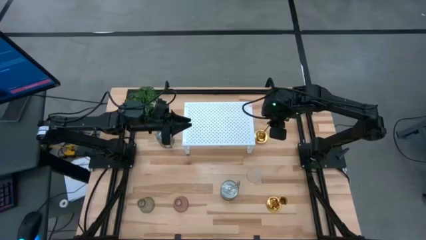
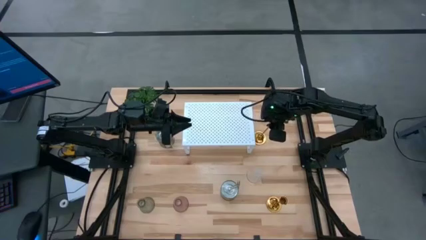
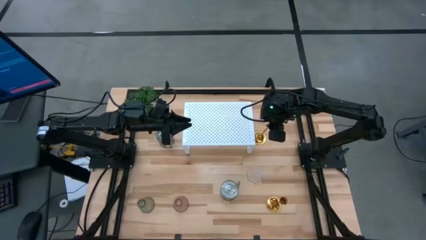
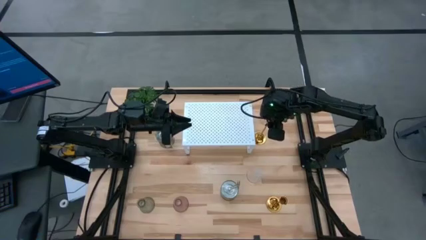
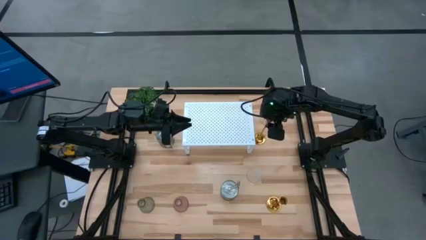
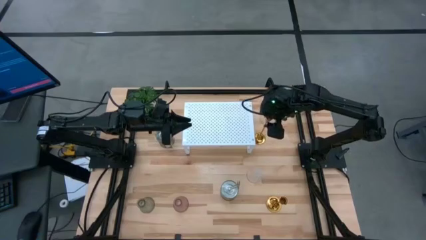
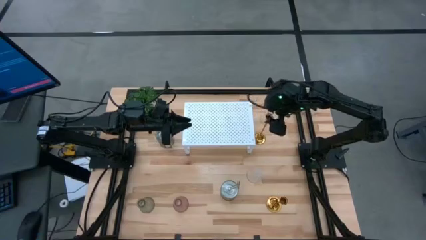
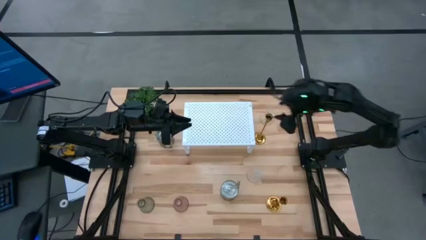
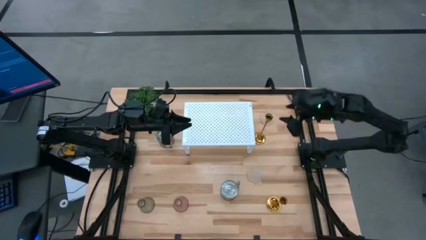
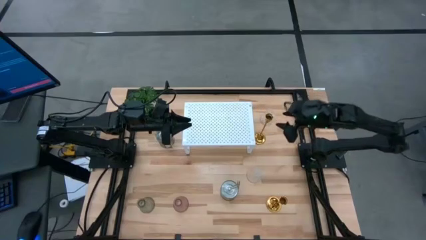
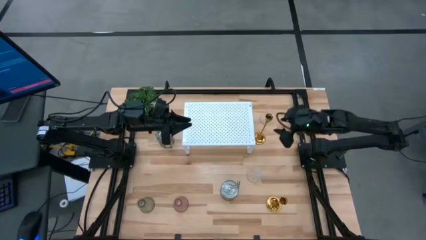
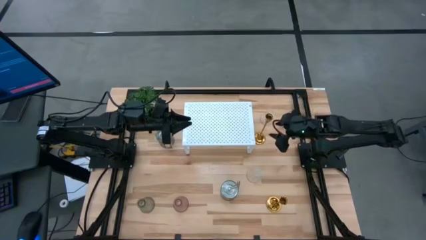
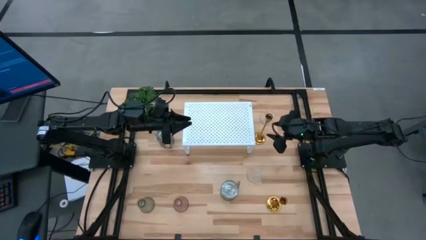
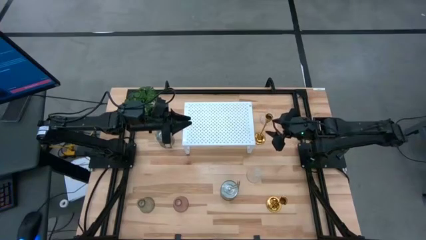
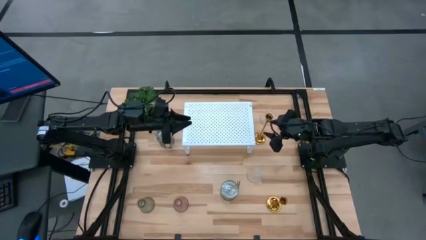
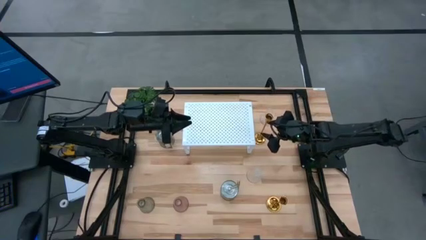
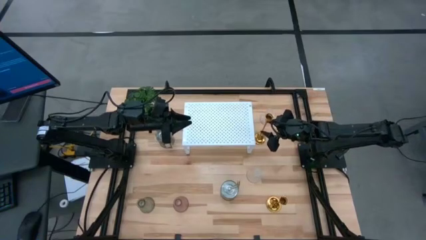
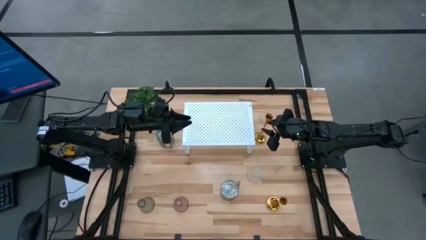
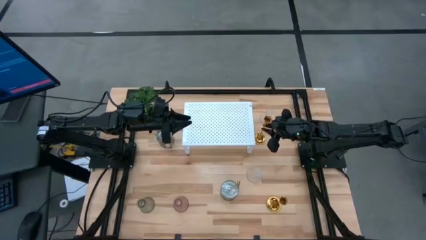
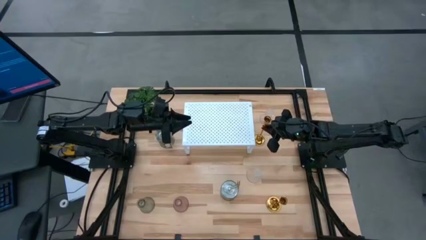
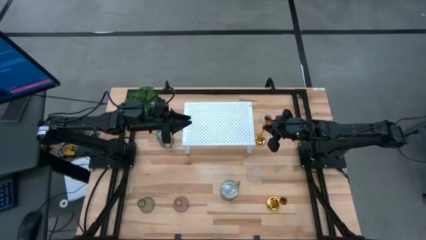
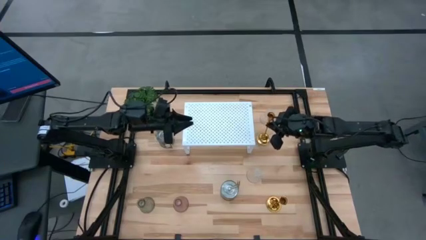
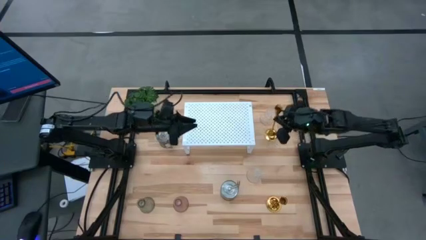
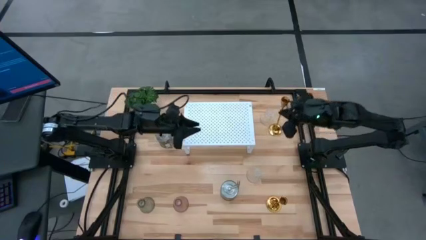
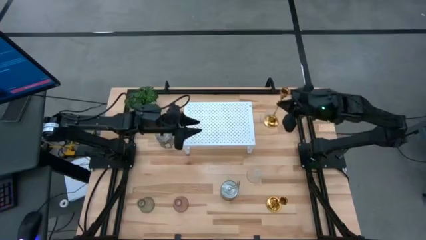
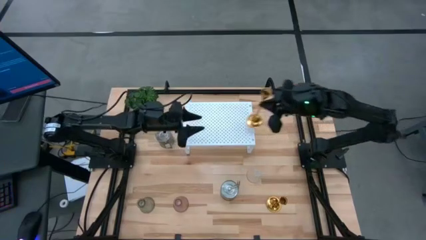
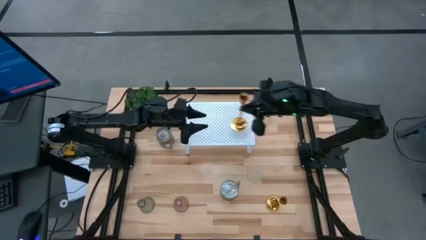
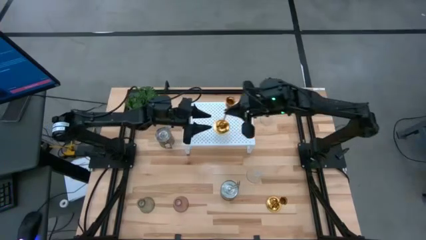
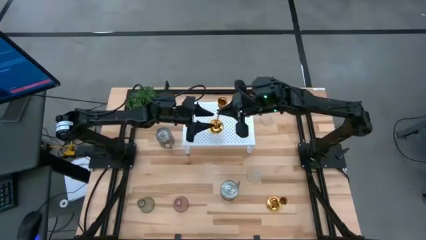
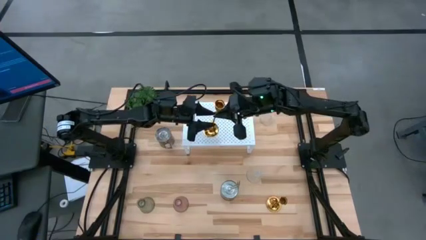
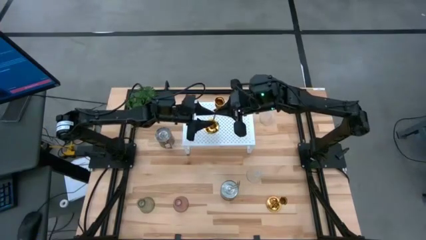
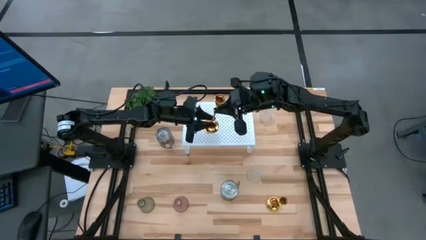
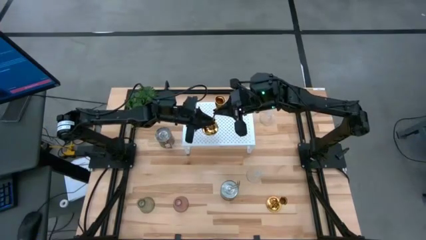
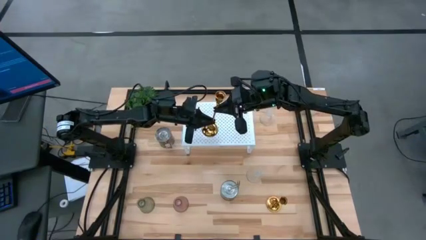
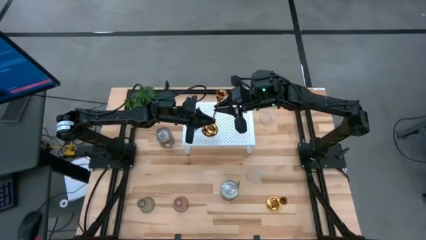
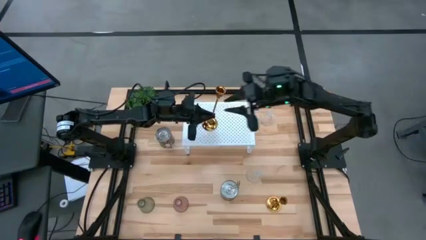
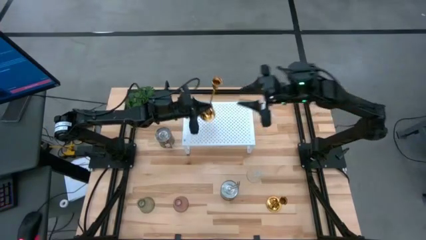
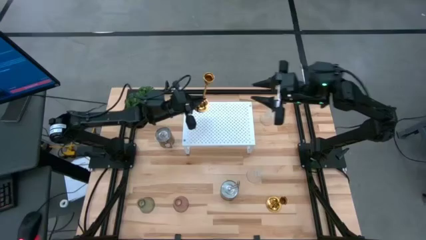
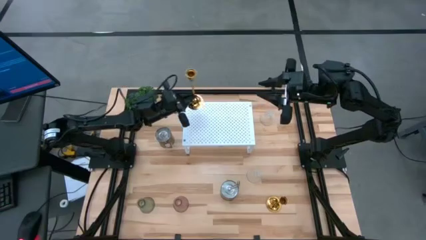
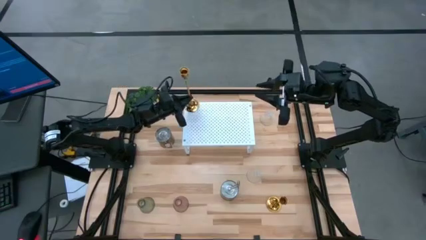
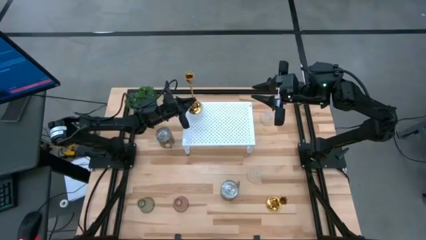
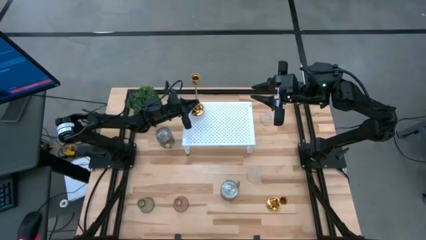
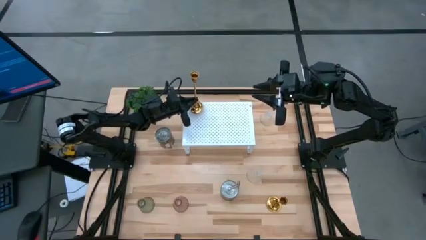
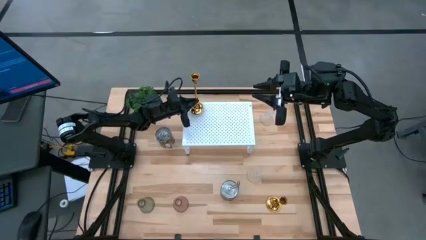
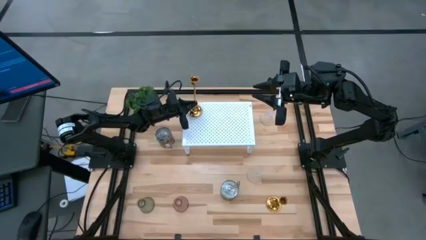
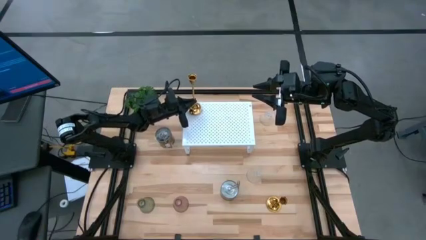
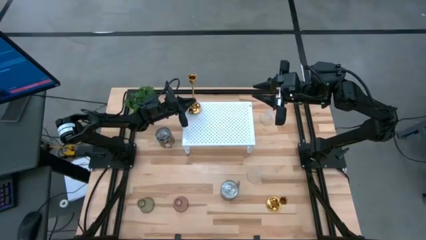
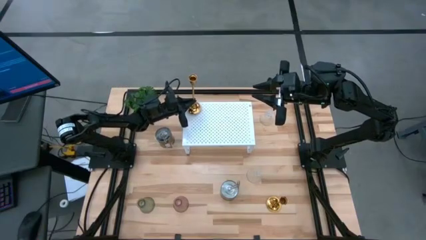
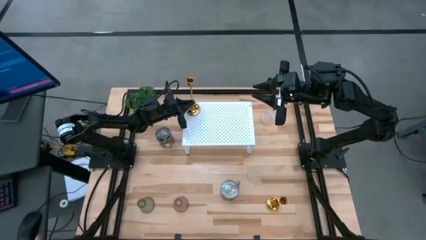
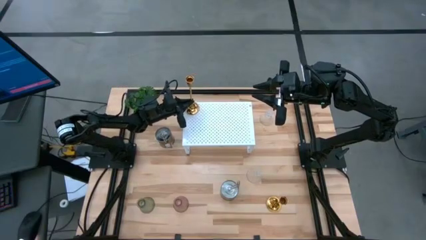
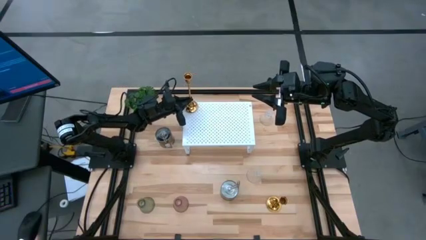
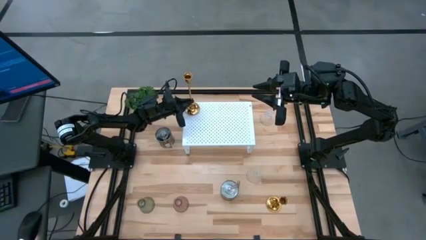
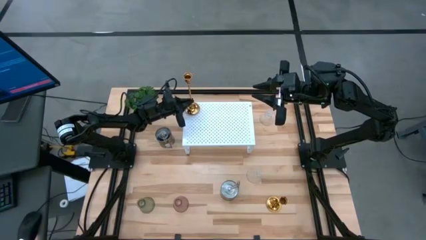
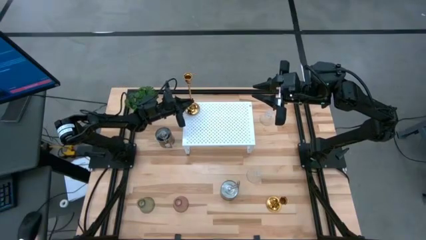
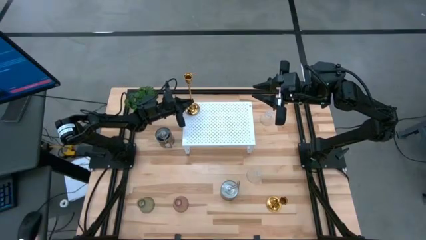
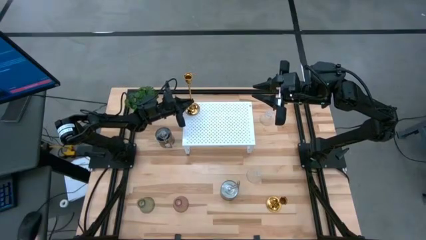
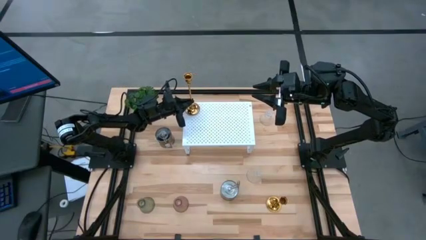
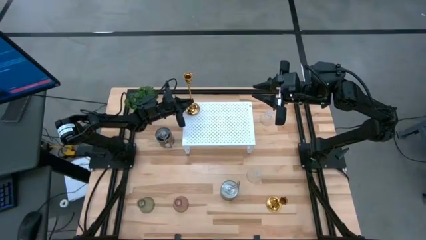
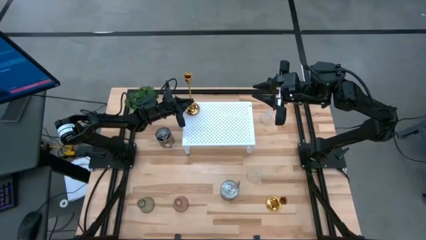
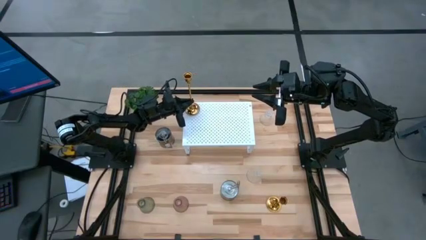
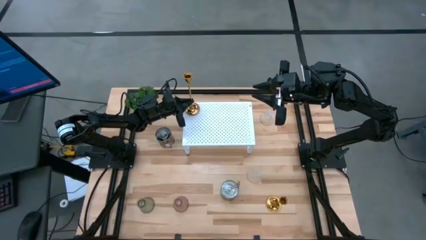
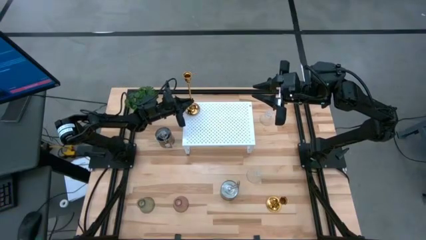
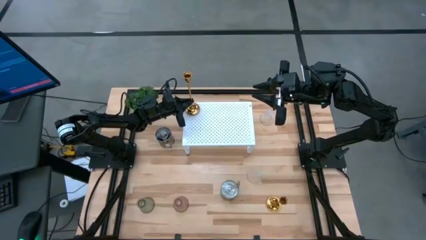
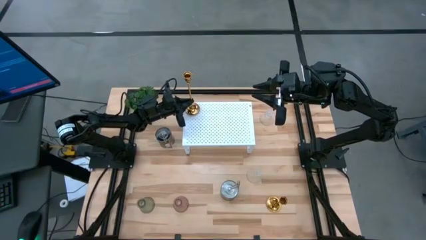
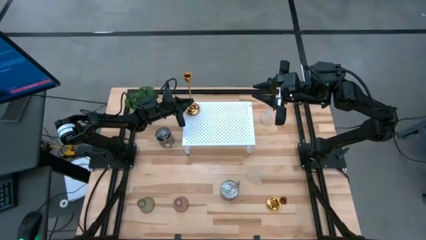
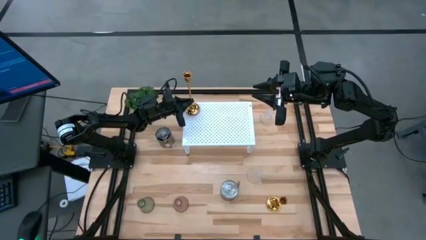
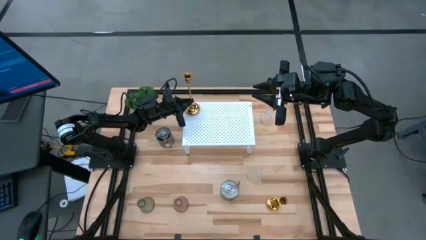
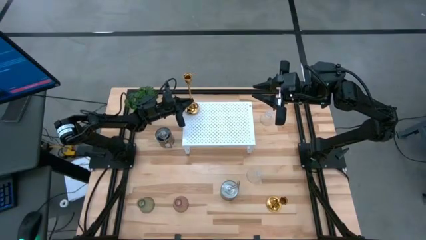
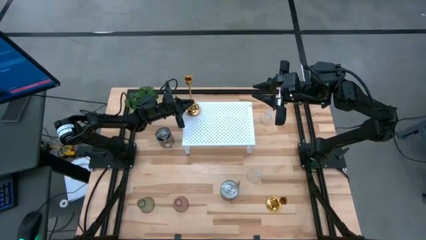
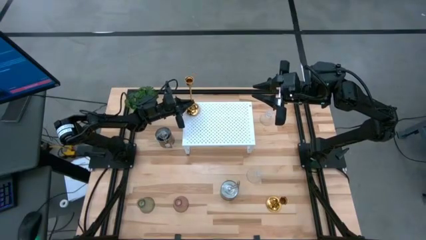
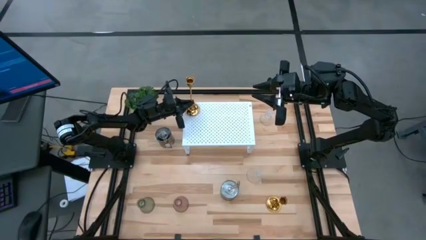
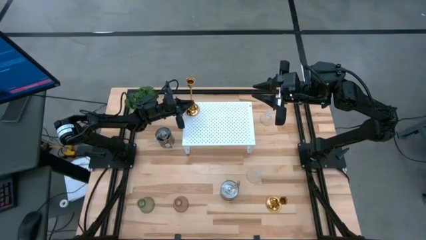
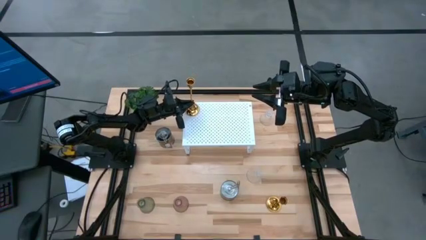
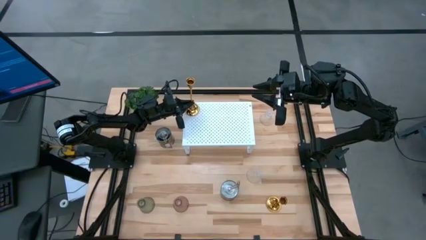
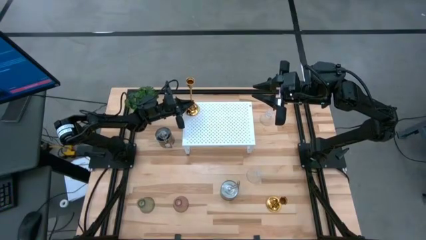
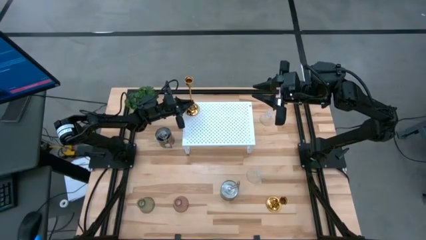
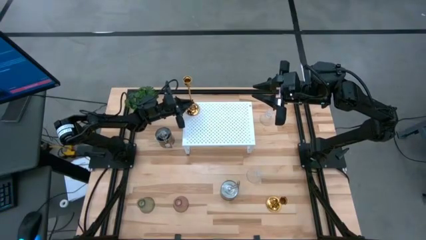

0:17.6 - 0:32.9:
Task: Pick & Place candle stick holders
Put the top gold candle holder on the shelf
